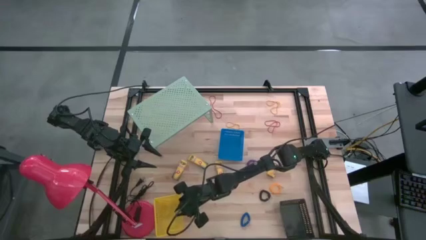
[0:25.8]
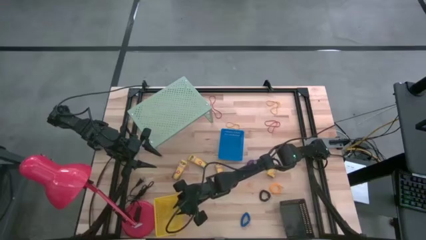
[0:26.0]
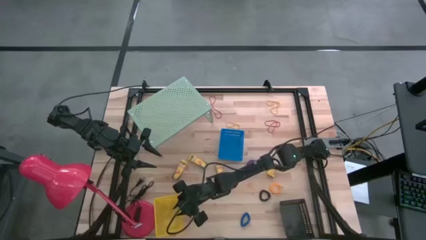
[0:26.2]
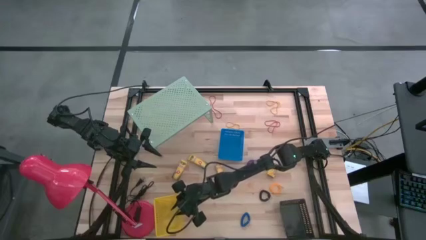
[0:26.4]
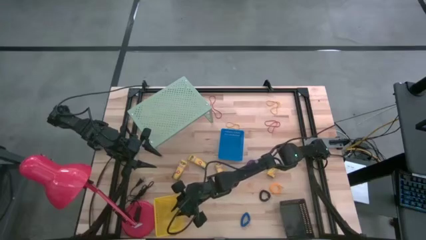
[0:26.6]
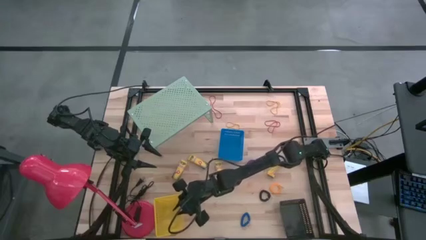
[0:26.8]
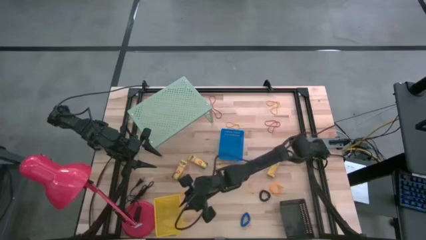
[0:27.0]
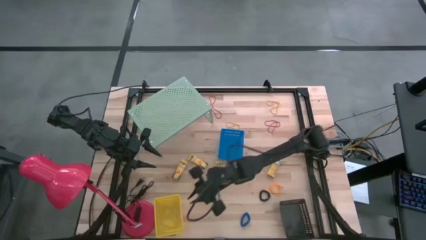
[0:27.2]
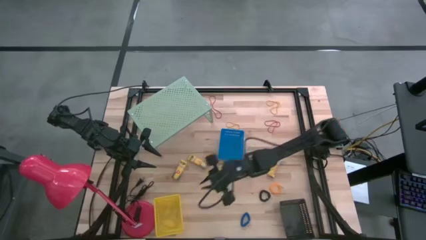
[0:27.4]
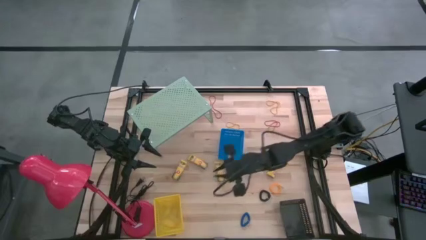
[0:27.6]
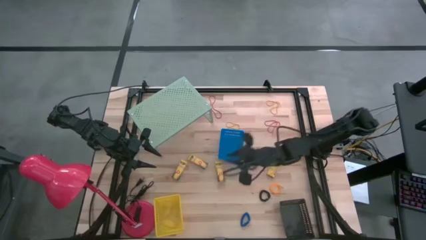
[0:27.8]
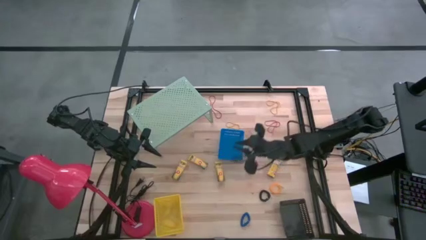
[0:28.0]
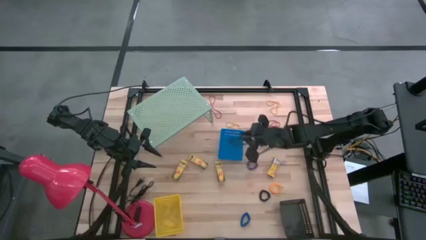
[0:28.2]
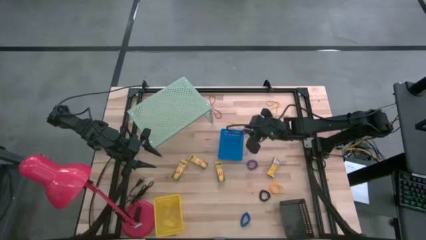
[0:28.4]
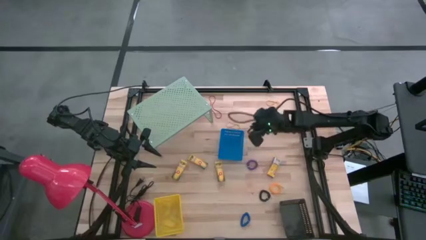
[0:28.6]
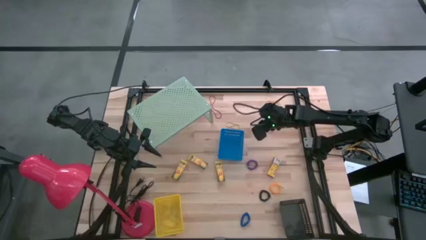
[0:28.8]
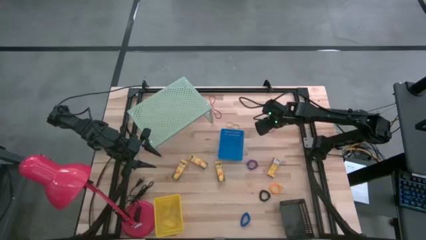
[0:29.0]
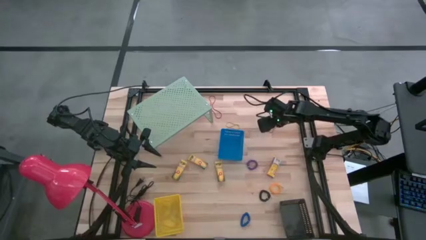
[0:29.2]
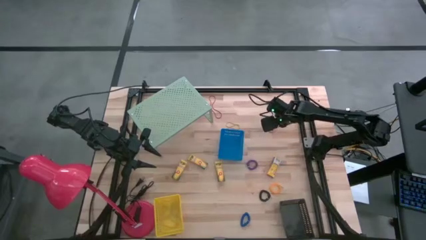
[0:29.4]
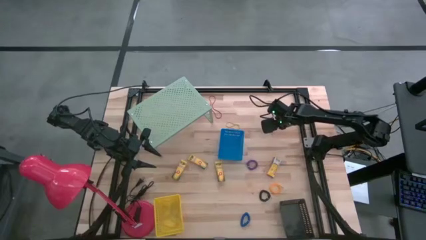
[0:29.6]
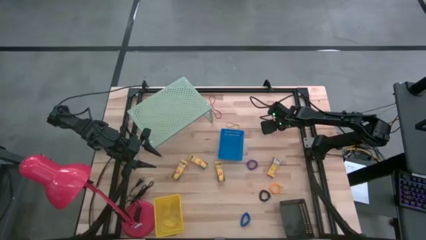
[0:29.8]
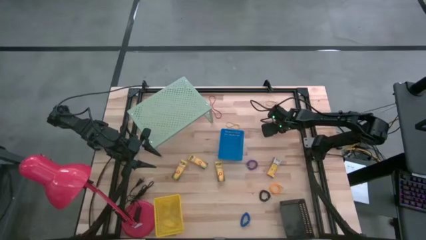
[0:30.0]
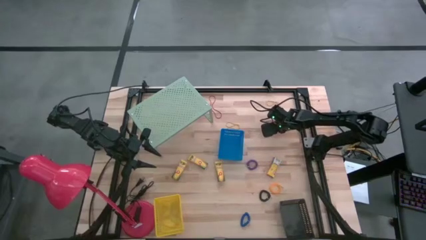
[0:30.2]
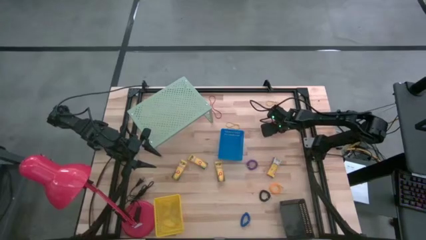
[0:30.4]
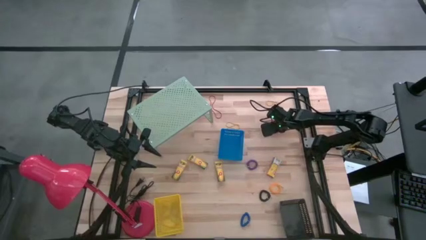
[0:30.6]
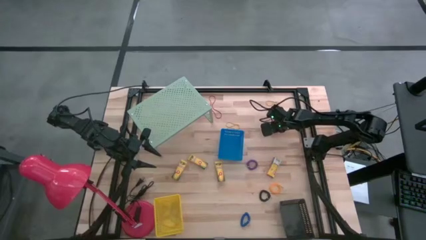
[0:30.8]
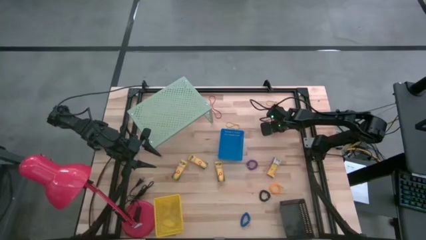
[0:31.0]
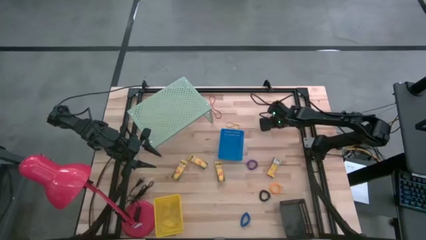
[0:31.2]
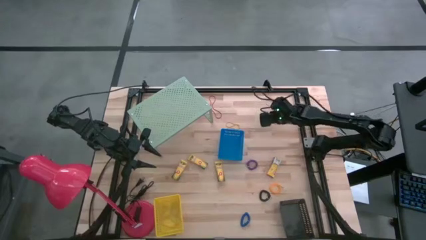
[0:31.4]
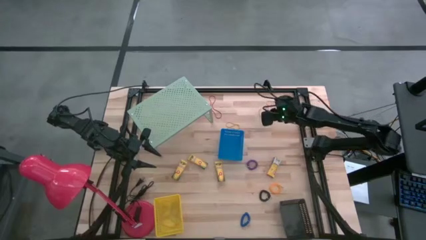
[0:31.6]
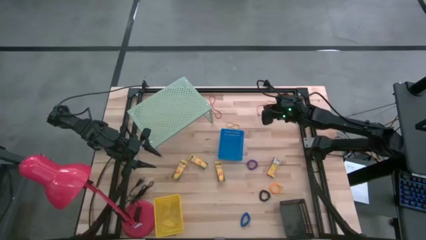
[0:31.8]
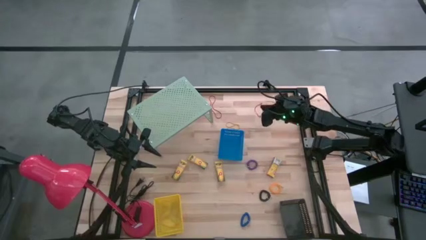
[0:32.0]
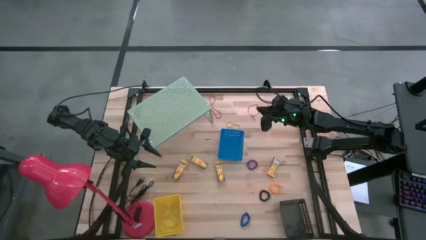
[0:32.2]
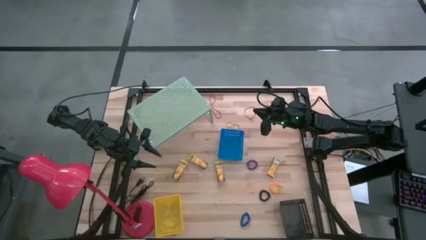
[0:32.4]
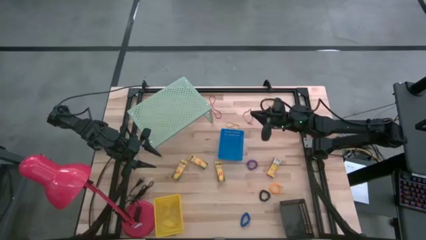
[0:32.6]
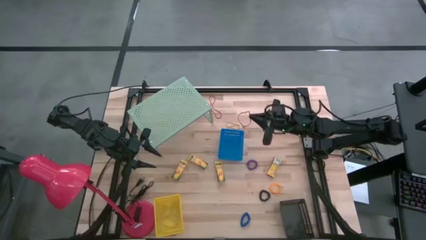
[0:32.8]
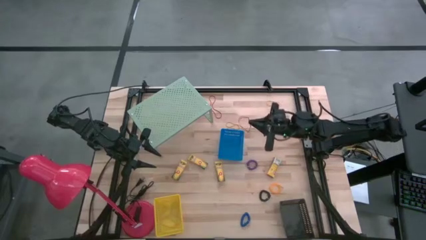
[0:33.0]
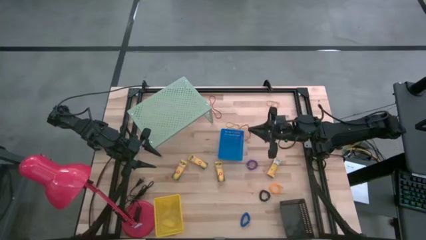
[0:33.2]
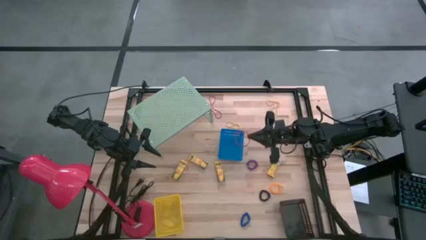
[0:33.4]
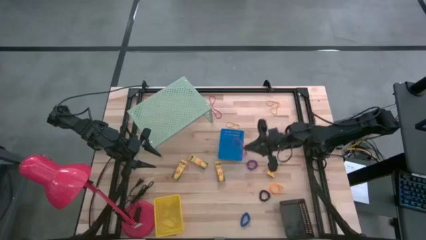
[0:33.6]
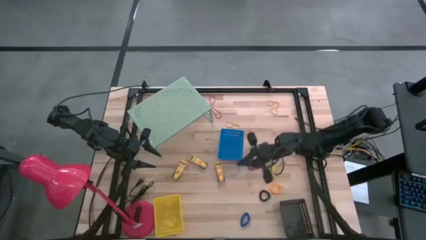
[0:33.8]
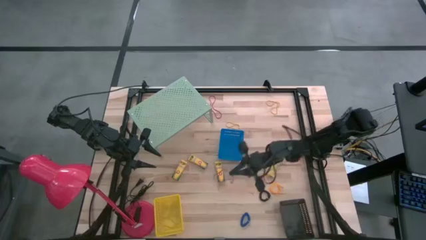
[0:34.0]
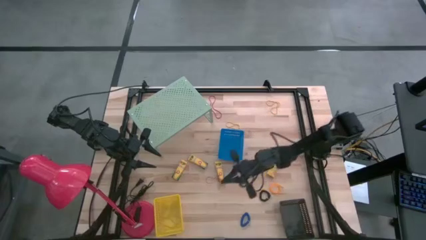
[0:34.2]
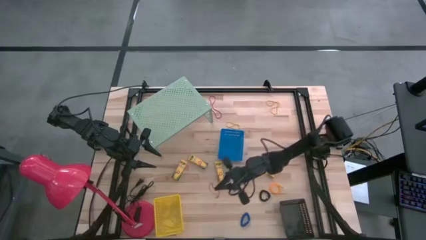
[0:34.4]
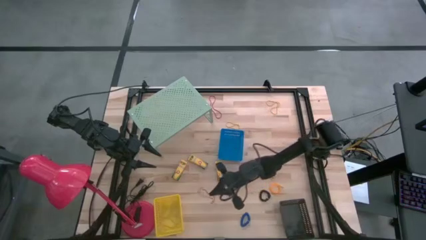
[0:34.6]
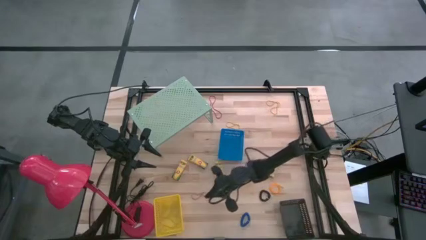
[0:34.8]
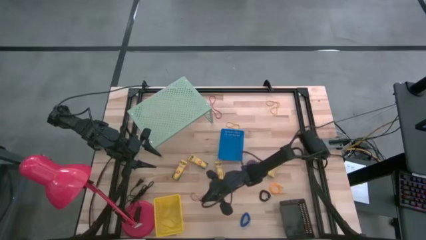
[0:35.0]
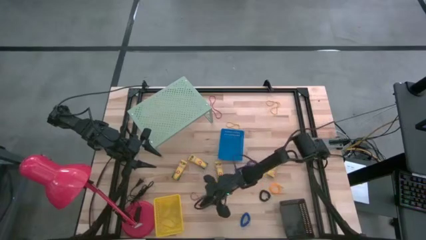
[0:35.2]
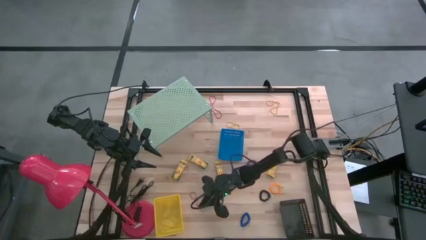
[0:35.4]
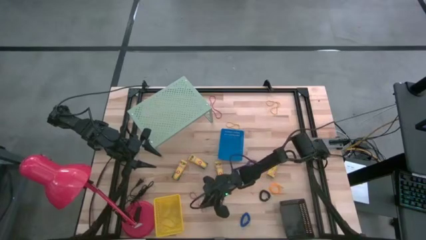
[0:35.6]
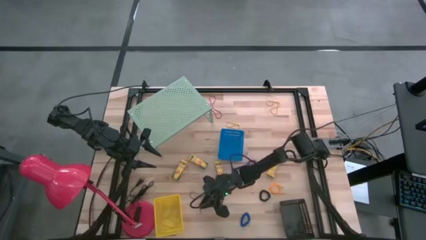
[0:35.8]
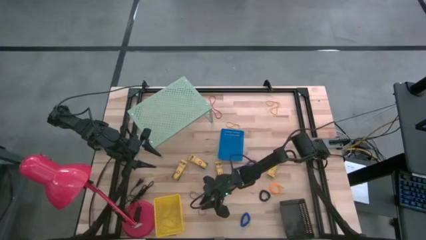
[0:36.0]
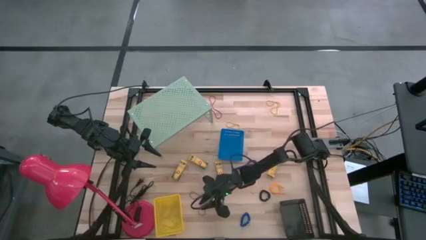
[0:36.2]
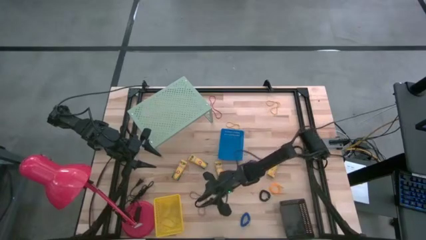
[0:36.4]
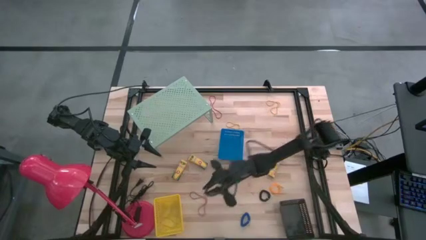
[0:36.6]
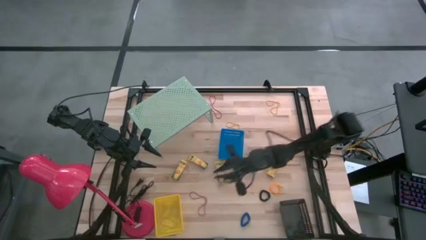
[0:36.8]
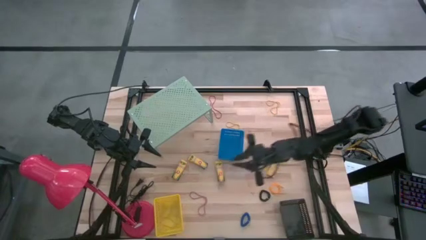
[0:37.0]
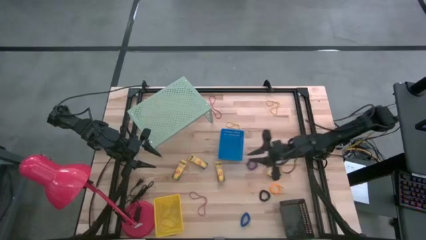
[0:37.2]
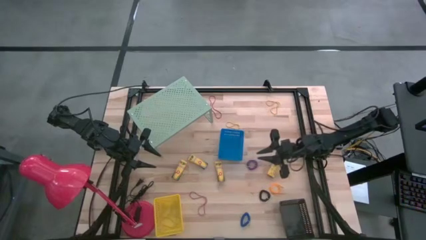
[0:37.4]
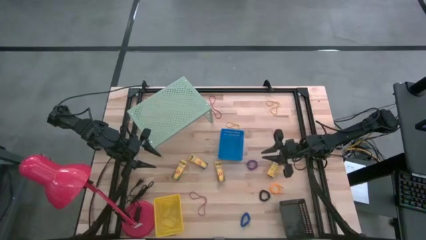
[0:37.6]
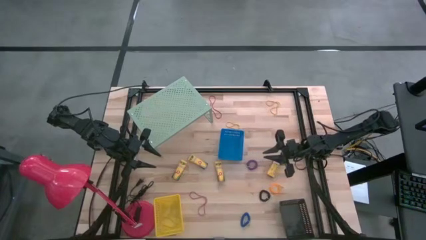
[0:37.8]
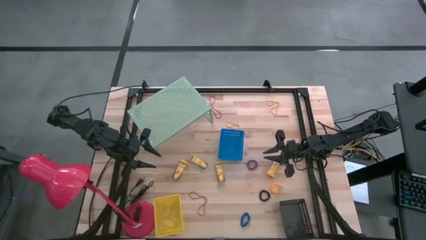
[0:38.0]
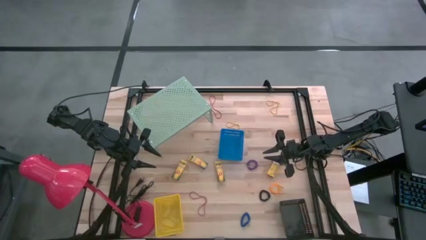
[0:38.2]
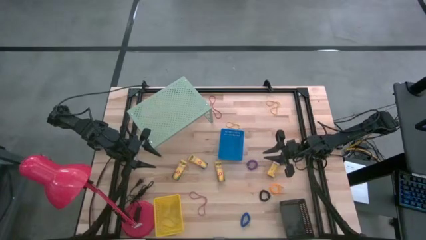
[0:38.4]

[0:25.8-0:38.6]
Task: Pick & Place Office Desk Supplies
Put the red rubber band into the yellow basket

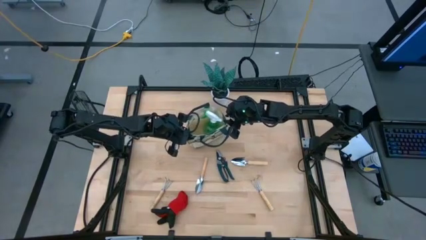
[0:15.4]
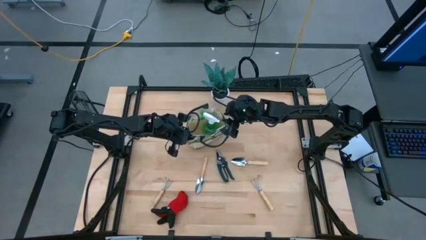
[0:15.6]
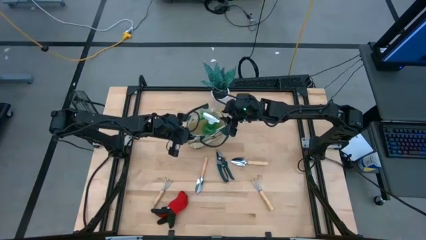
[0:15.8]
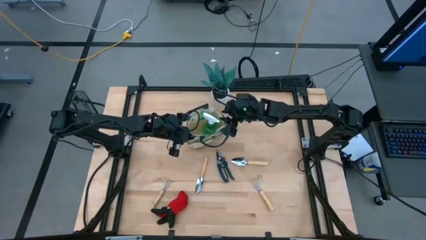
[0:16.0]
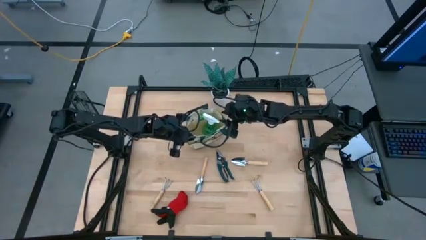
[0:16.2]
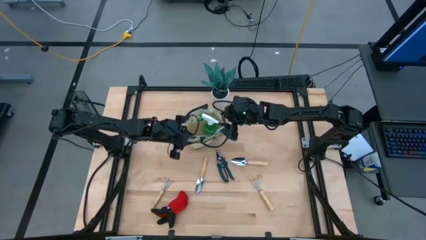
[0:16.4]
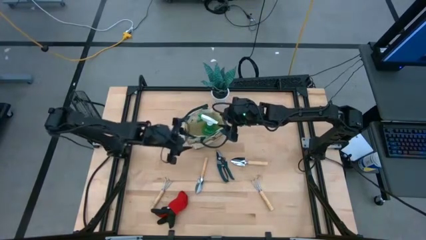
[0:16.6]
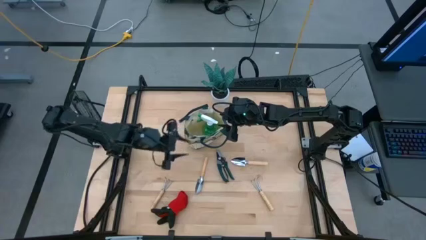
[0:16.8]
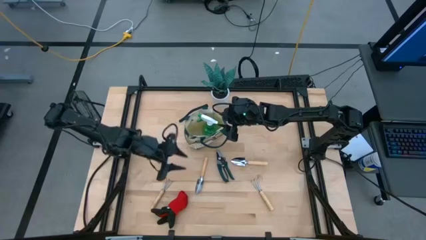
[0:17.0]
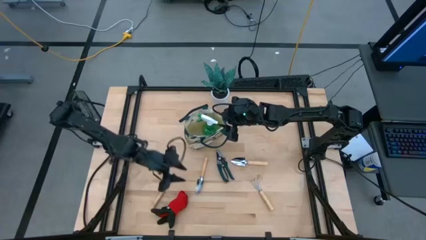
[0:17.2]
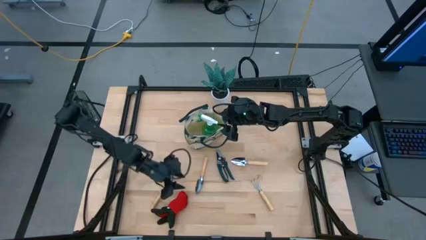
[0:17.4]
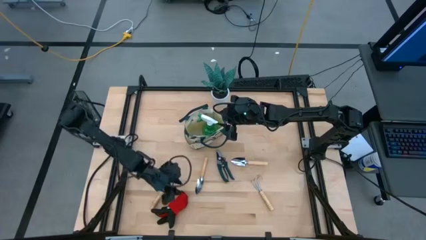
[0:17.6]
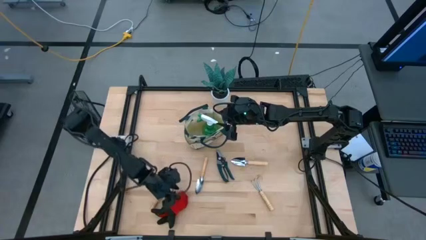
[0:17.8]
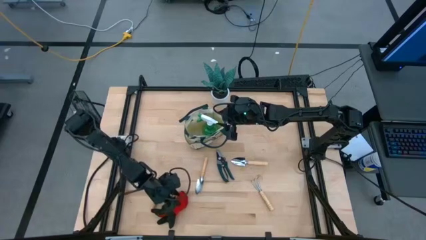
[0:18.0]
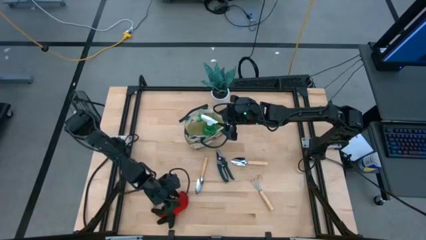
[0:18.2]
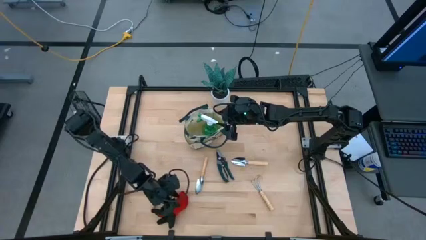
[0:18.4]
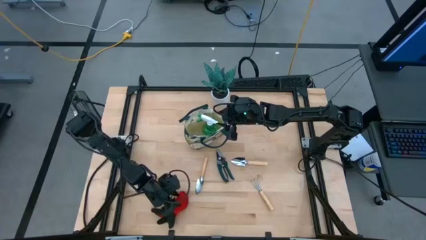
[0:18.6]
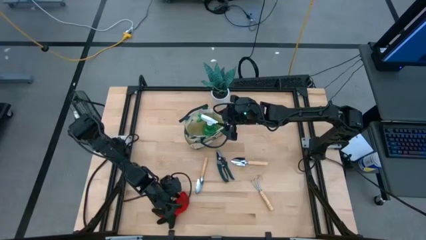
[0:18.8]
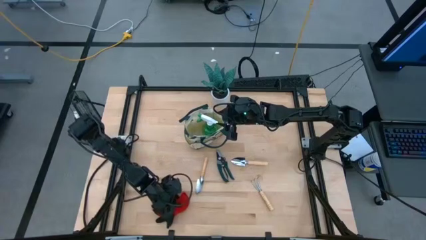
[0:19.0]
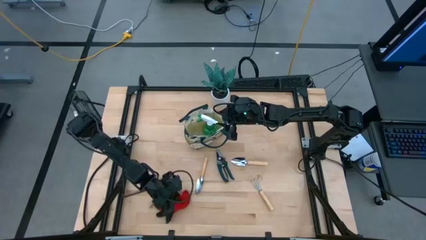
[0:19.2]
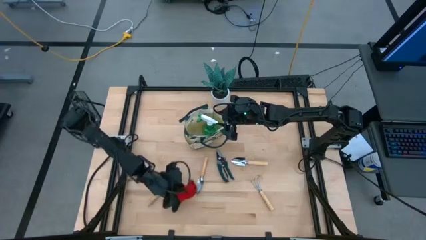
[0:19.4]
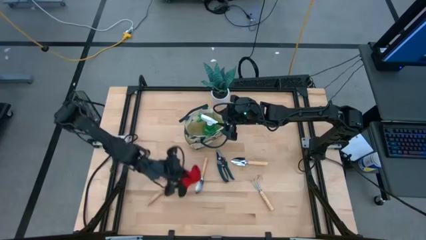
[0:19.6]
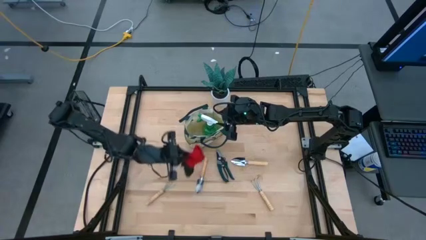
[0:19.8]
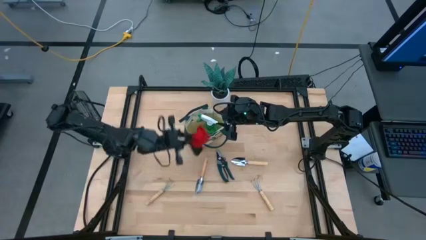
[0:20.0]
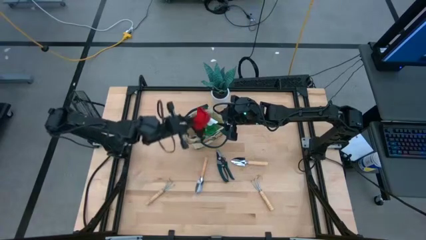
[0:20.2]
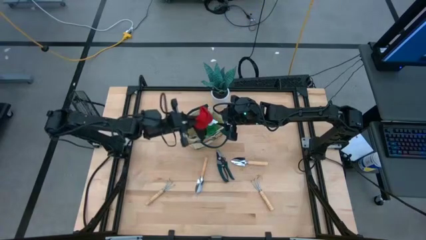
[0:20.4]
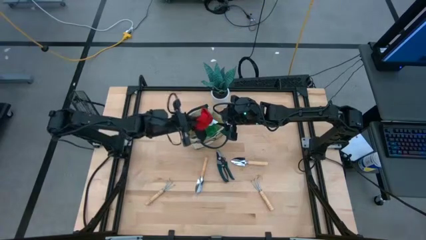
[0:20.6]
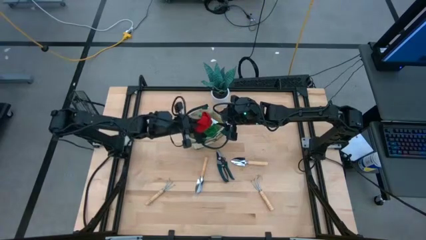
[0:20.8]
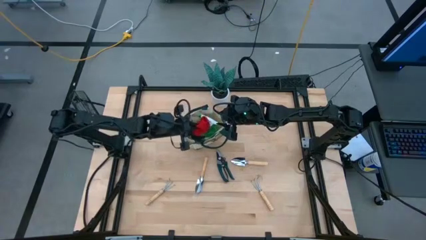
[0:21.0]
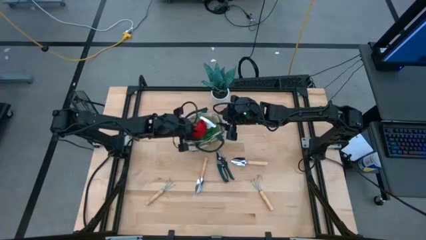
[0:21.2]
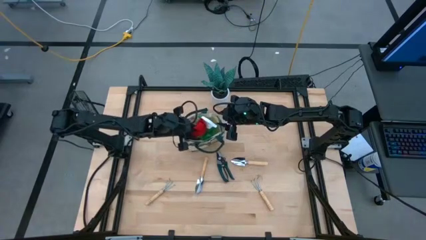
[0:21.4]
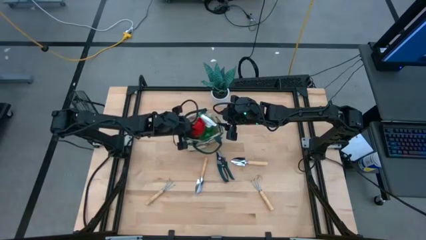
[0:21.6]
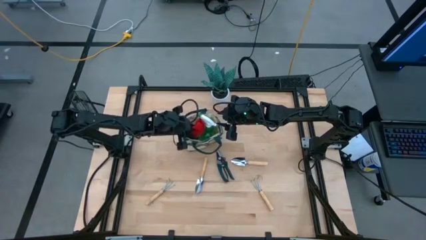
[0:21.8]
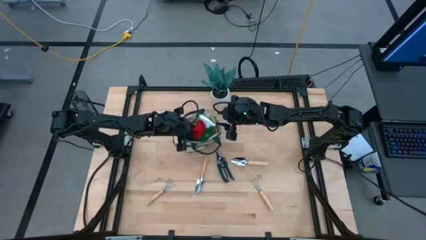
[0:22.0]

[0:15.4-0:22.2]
Task: Pick & Place Garden tools in Gardening bag
Put the red gloves into the brown gardening bag
